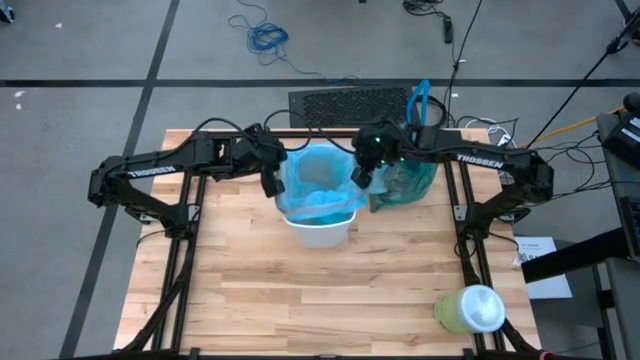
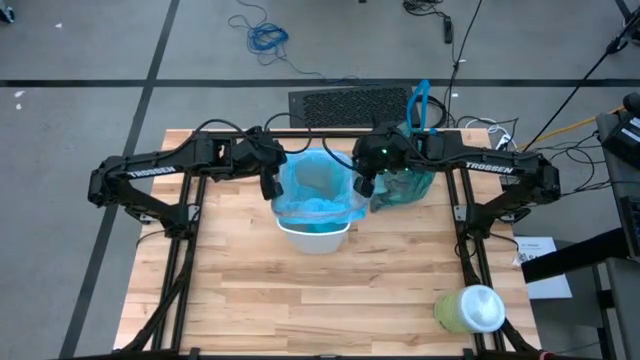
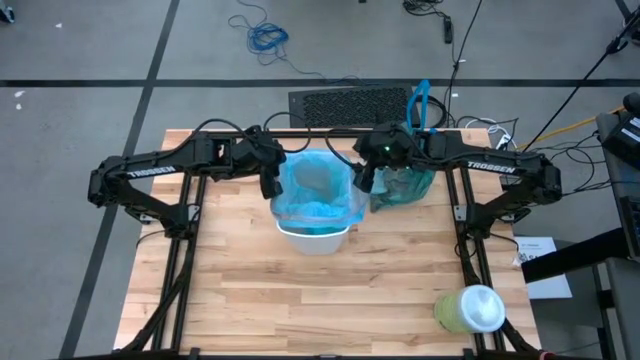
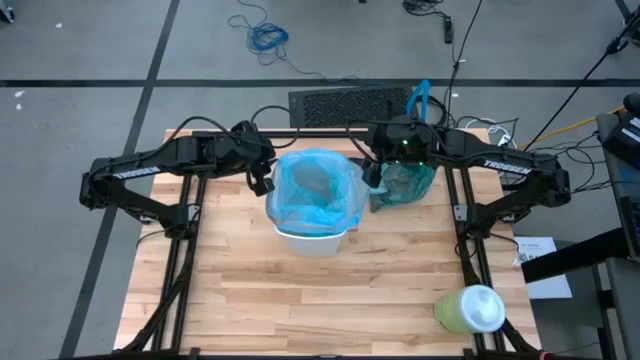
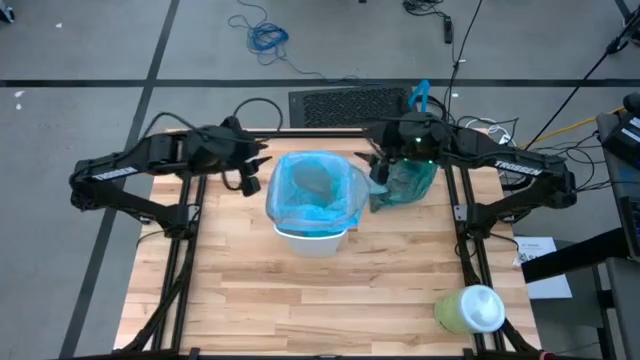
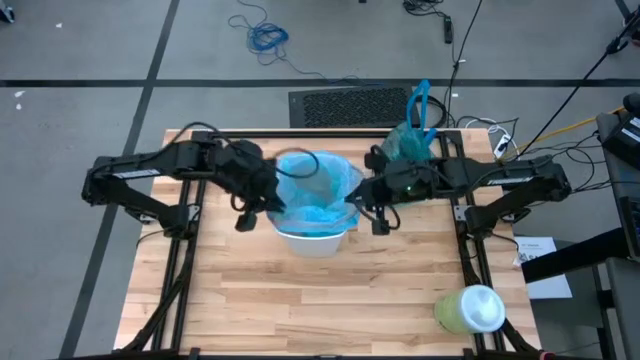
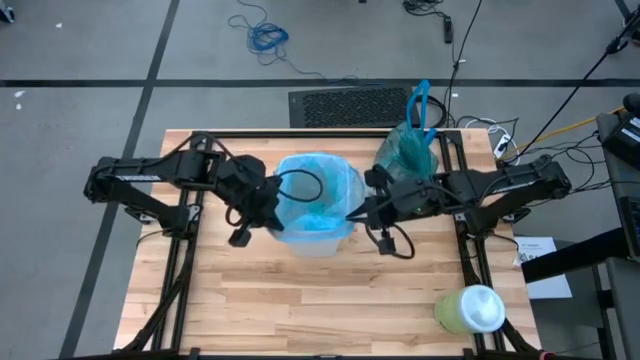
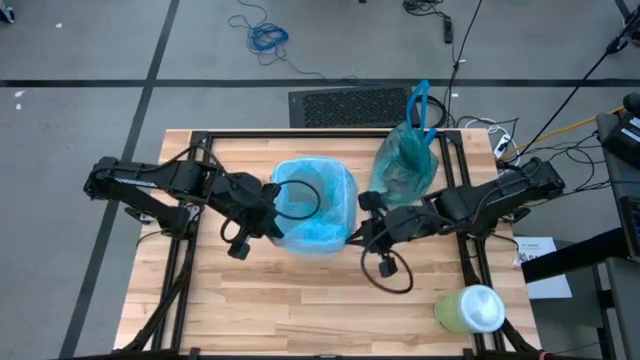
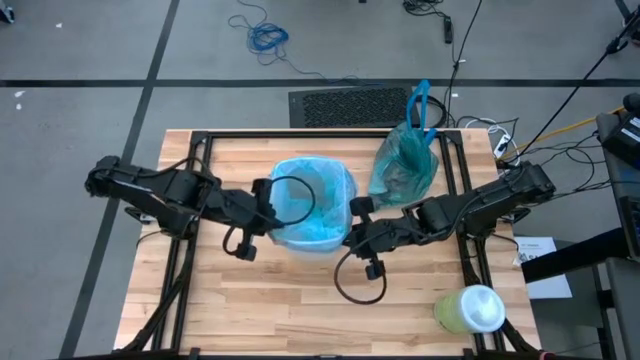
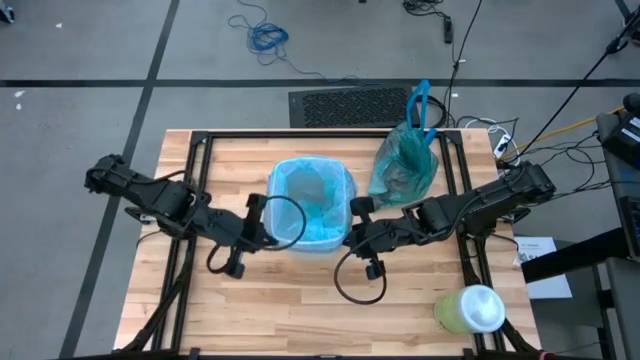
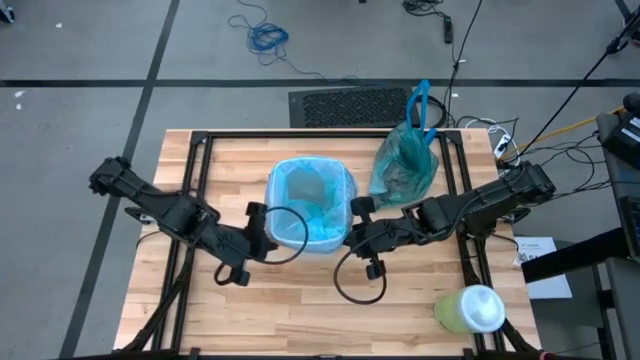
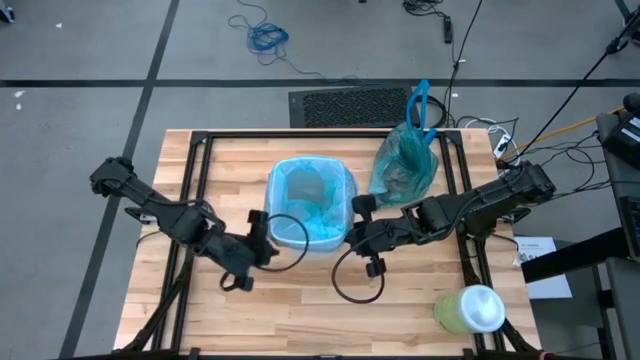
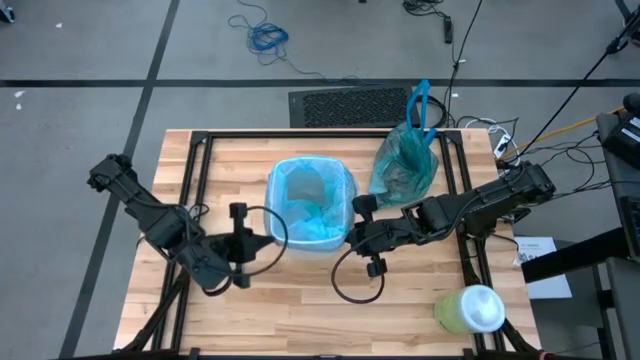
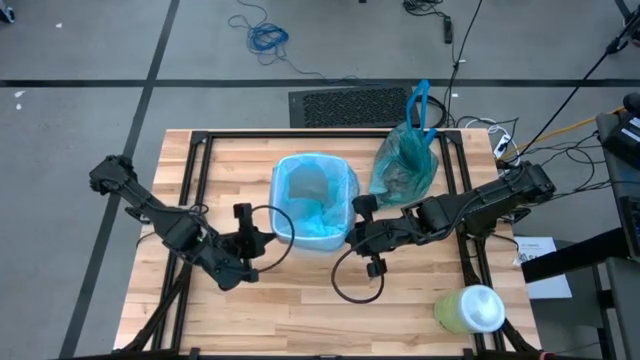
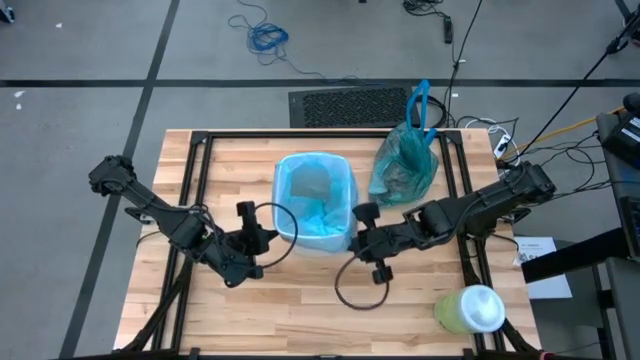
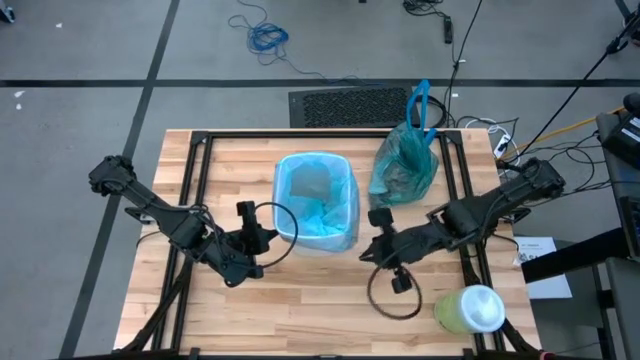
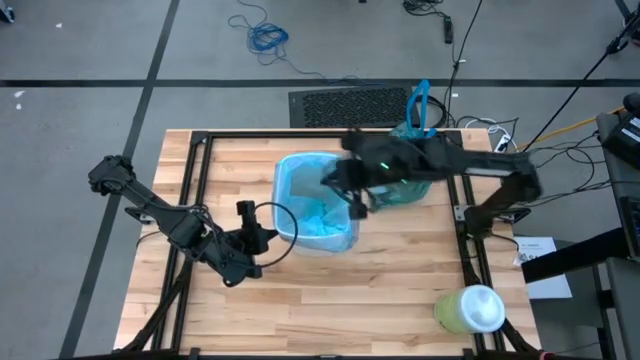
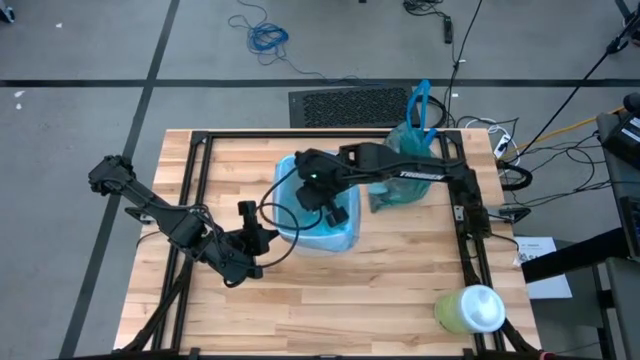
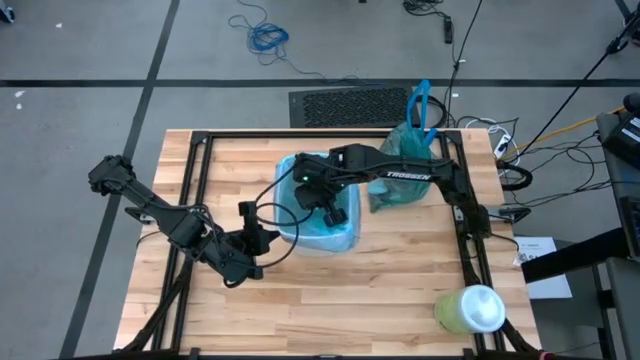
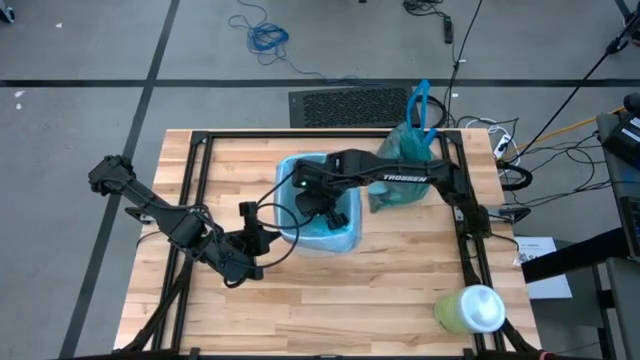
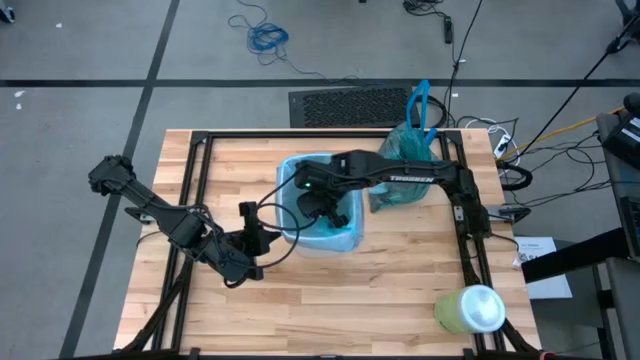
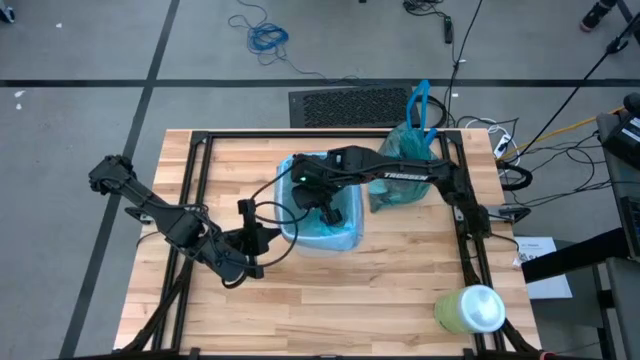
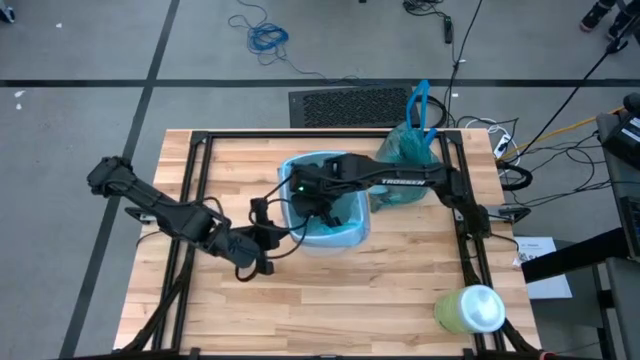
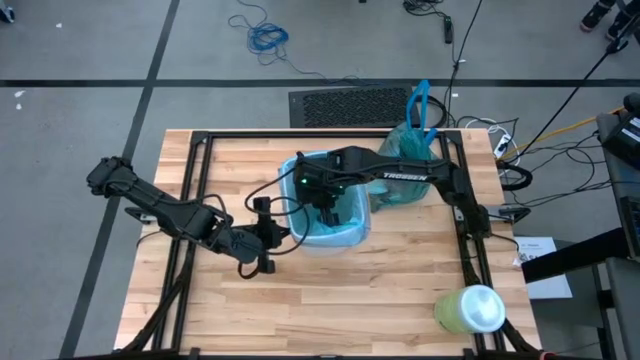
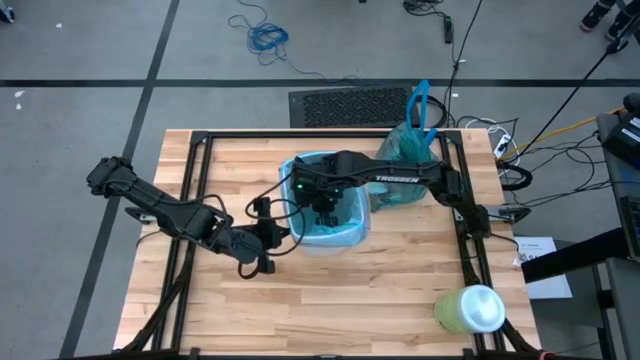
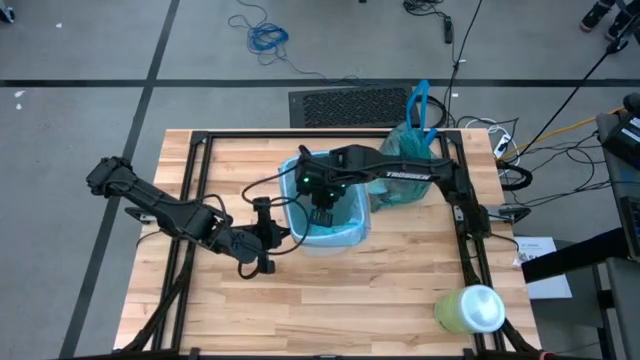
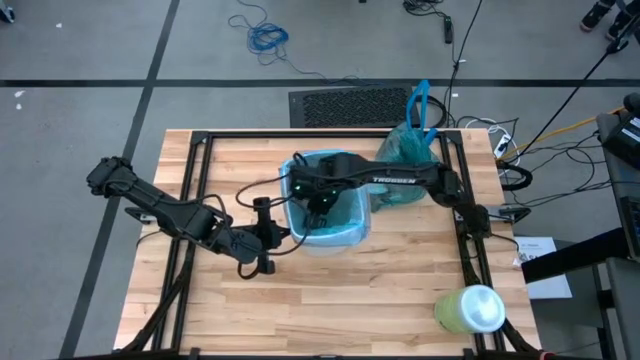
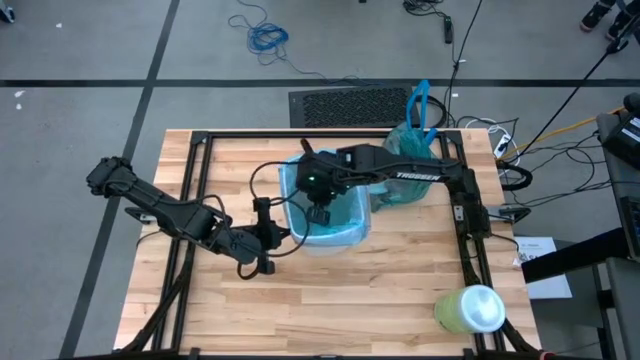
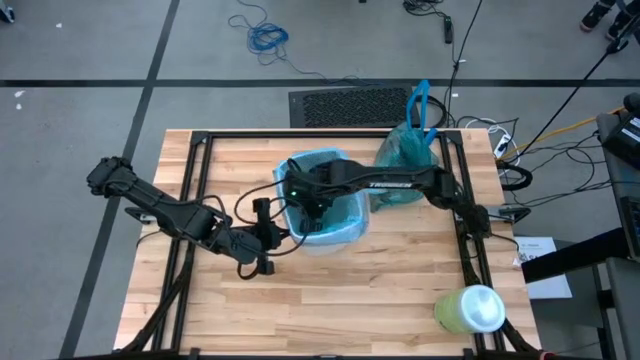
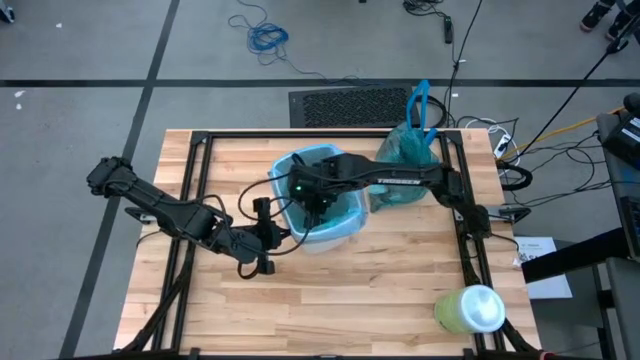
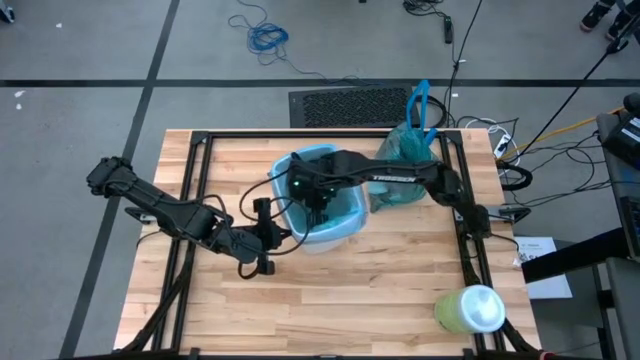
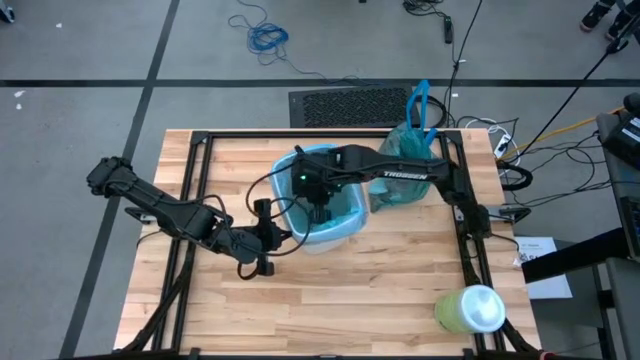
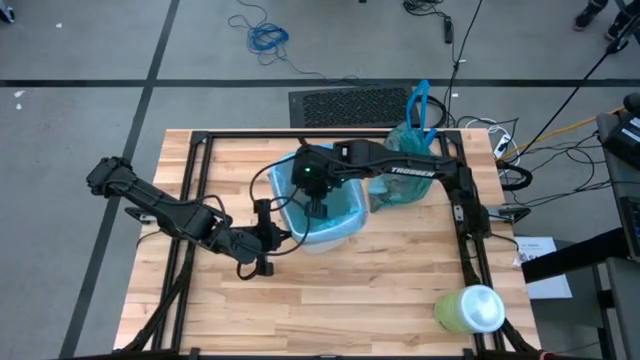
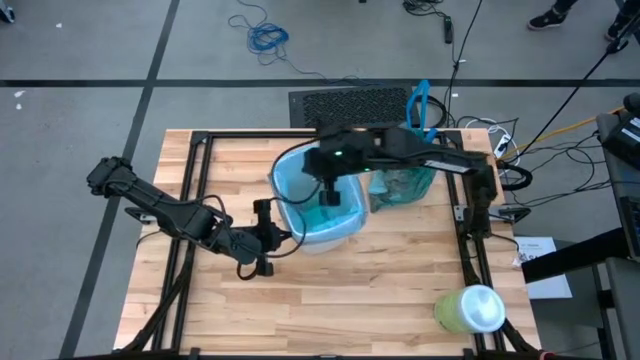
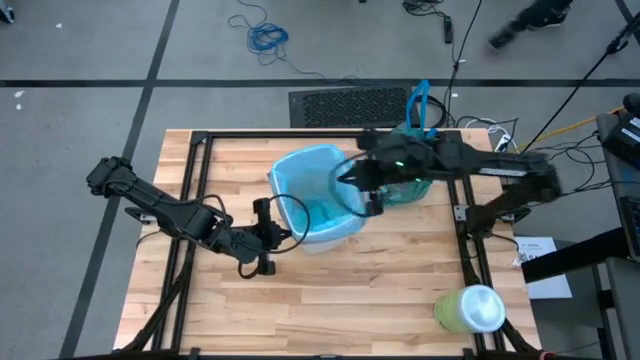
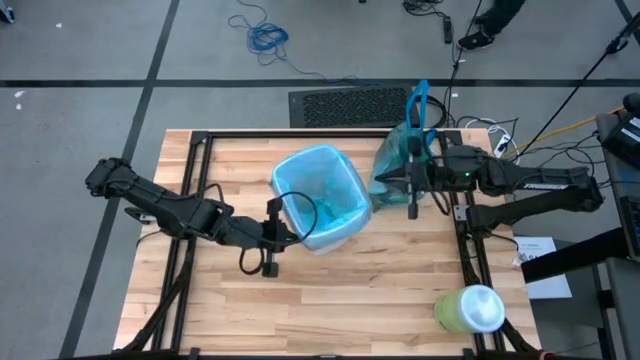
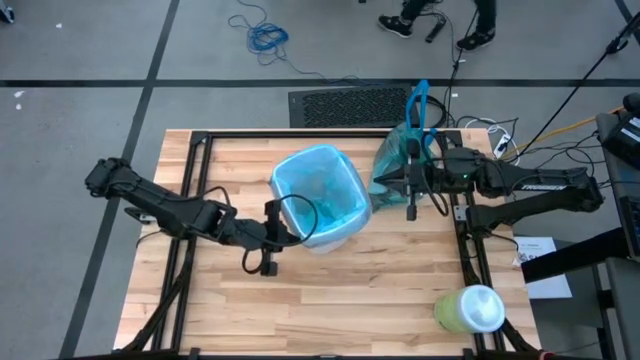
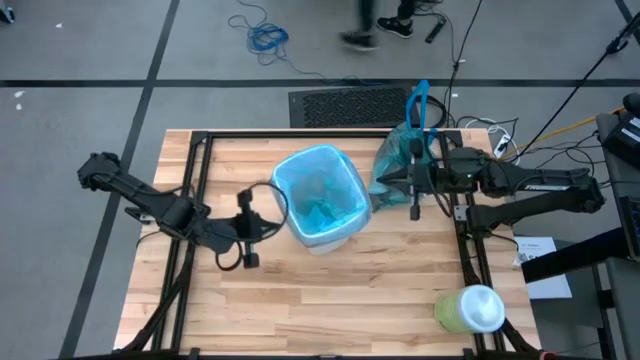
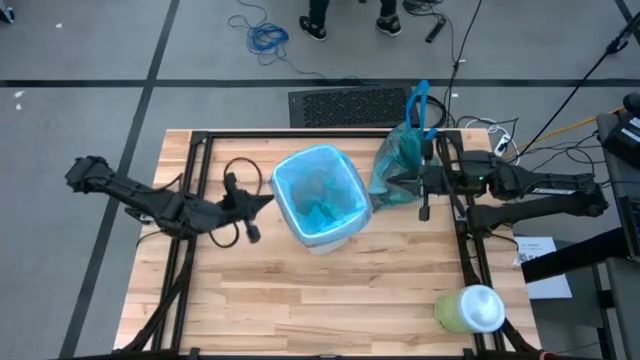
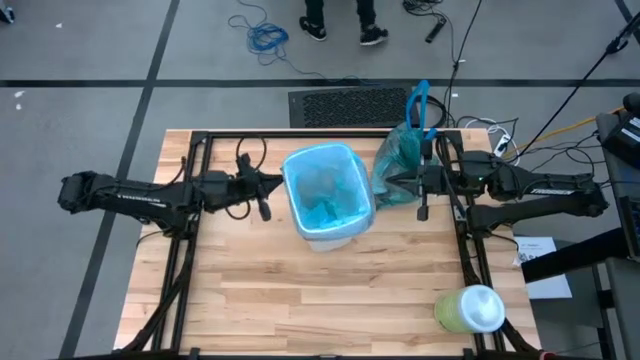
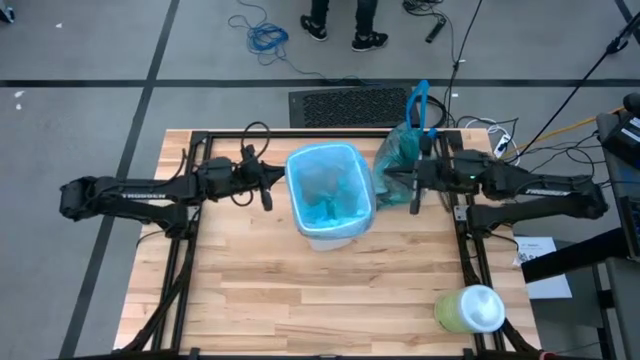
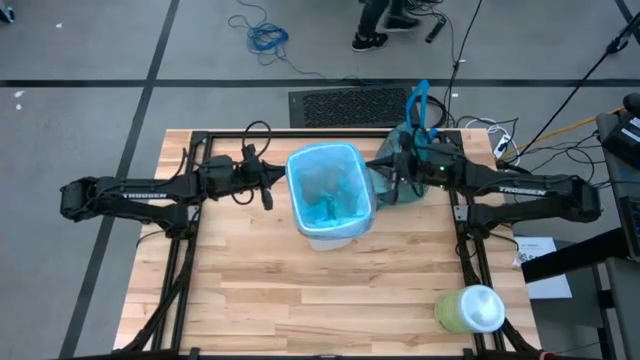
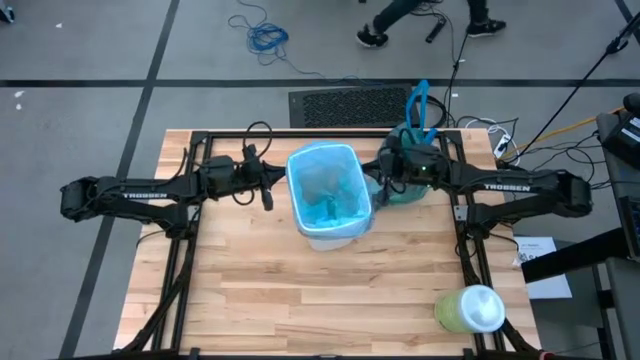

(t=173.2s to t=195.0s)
Task: place trash/remove bag and relplace
Insert a new trash bag into the trash bin
